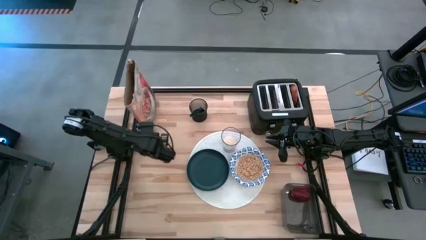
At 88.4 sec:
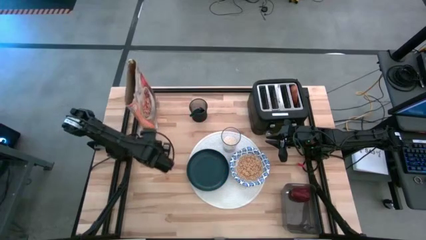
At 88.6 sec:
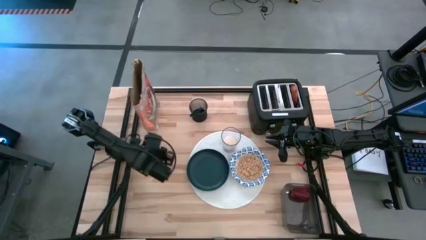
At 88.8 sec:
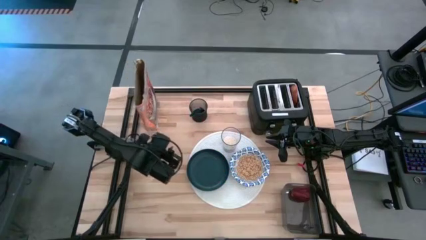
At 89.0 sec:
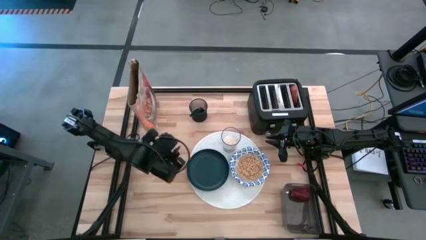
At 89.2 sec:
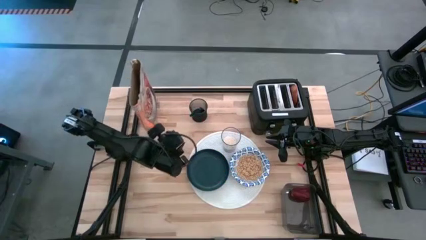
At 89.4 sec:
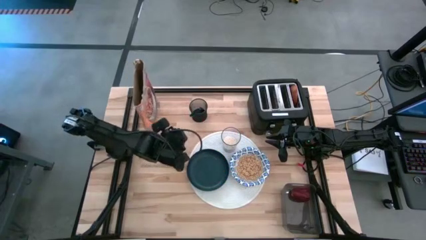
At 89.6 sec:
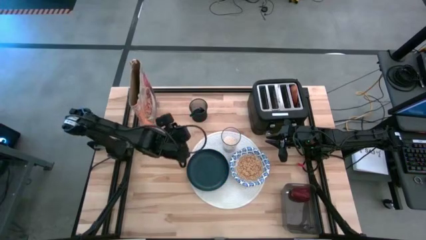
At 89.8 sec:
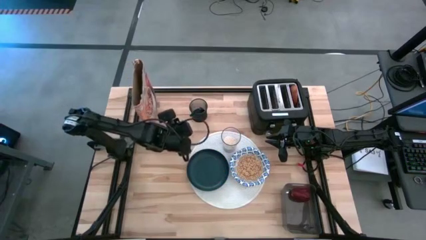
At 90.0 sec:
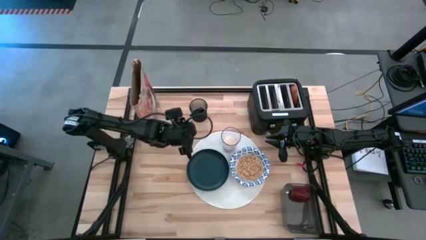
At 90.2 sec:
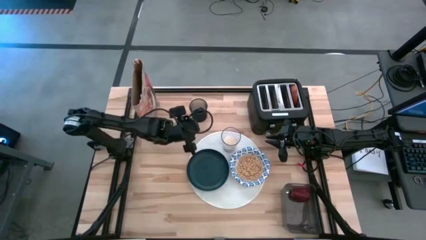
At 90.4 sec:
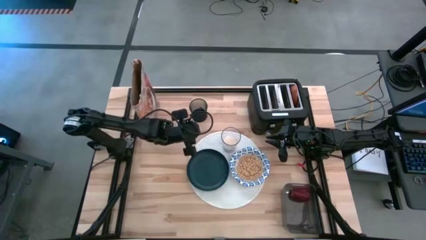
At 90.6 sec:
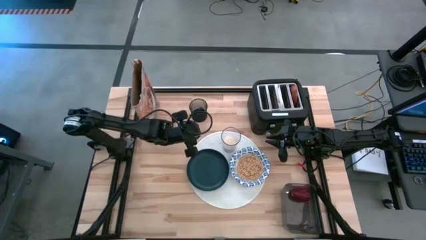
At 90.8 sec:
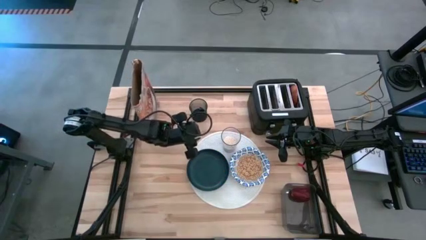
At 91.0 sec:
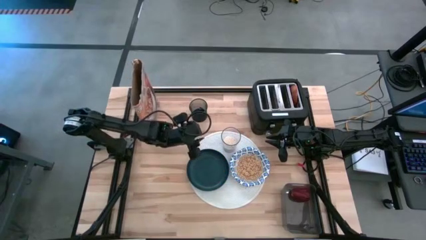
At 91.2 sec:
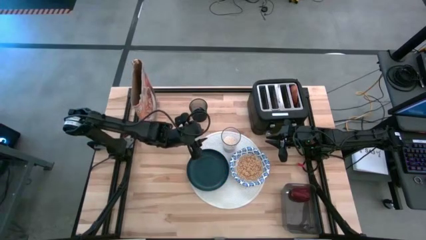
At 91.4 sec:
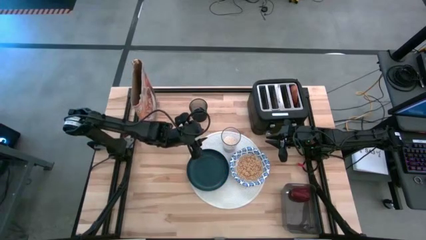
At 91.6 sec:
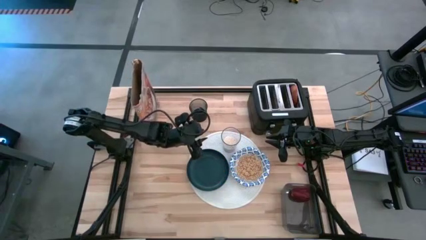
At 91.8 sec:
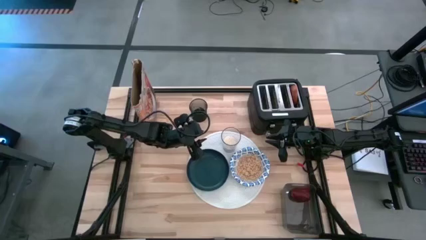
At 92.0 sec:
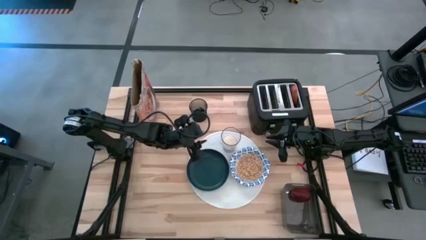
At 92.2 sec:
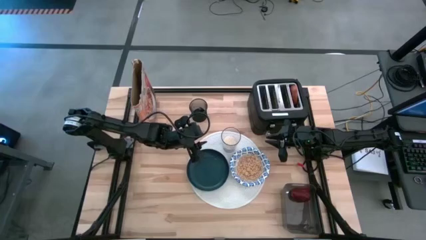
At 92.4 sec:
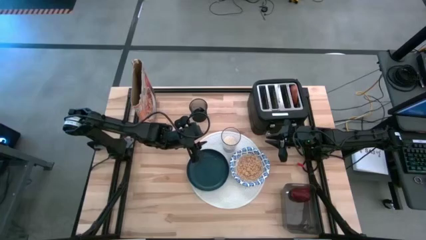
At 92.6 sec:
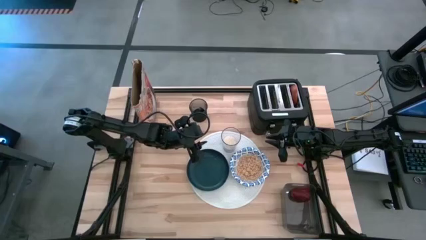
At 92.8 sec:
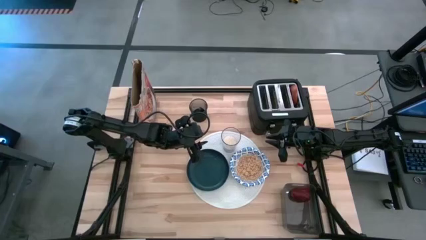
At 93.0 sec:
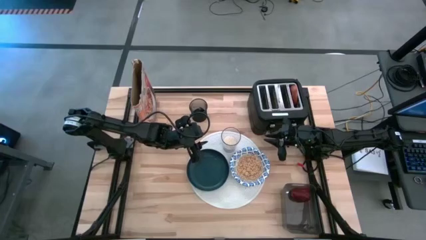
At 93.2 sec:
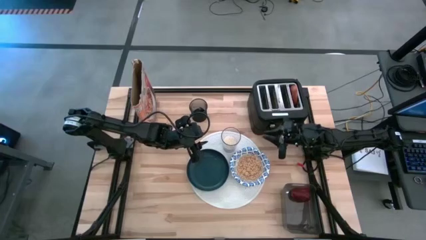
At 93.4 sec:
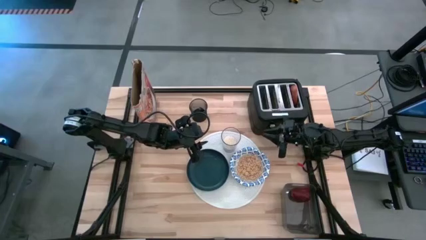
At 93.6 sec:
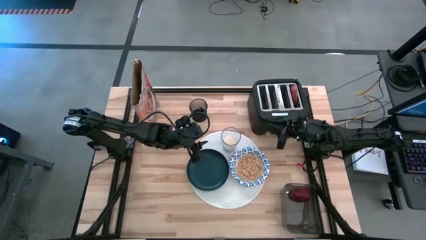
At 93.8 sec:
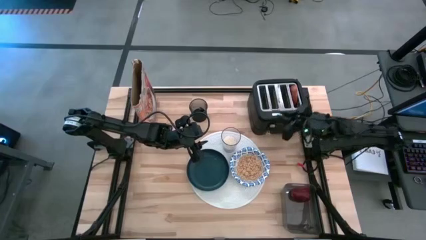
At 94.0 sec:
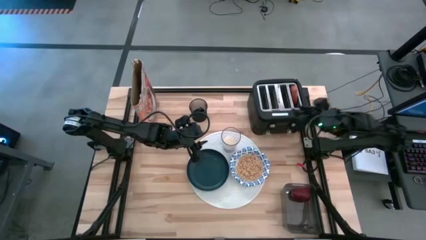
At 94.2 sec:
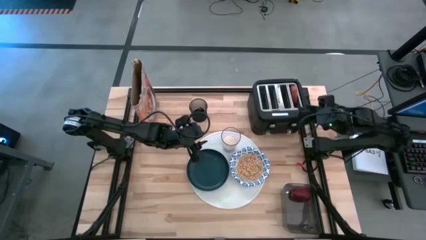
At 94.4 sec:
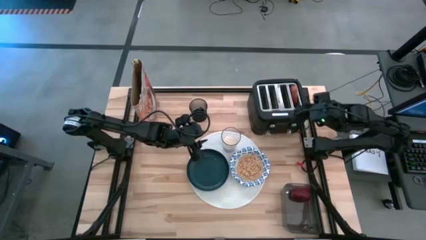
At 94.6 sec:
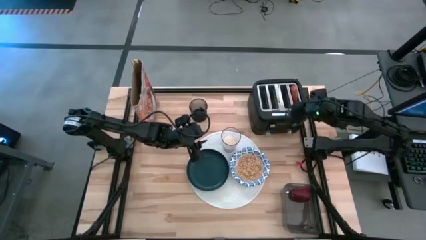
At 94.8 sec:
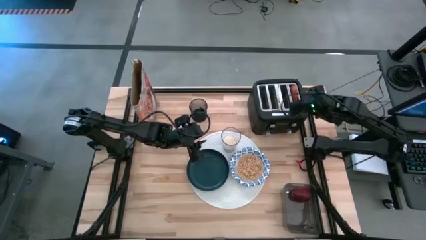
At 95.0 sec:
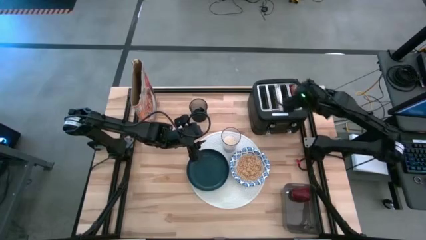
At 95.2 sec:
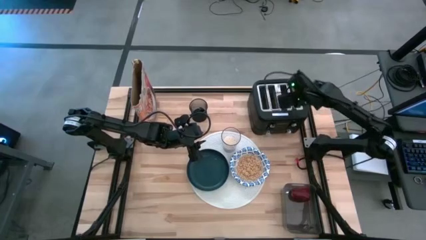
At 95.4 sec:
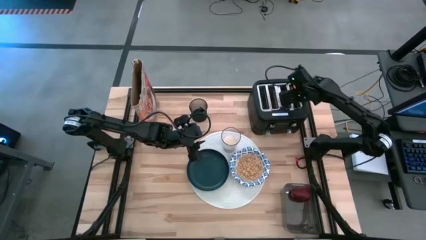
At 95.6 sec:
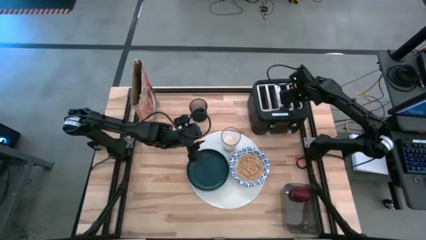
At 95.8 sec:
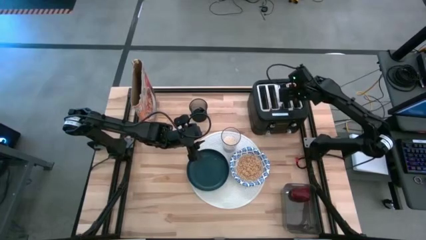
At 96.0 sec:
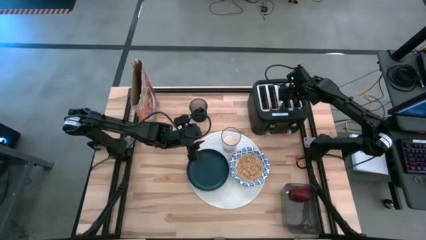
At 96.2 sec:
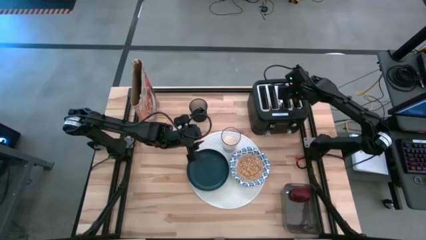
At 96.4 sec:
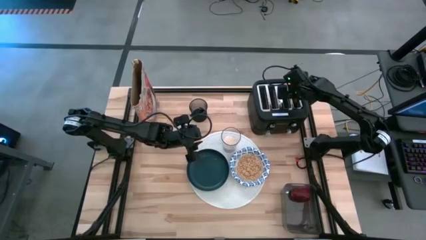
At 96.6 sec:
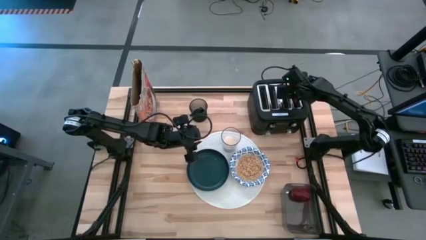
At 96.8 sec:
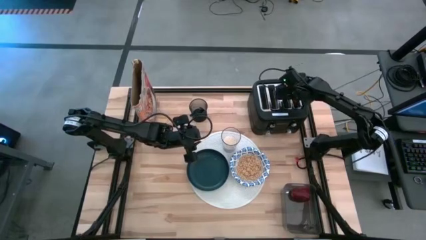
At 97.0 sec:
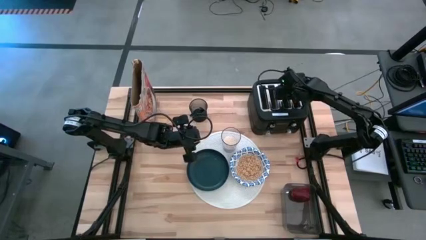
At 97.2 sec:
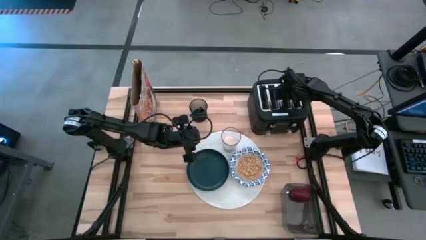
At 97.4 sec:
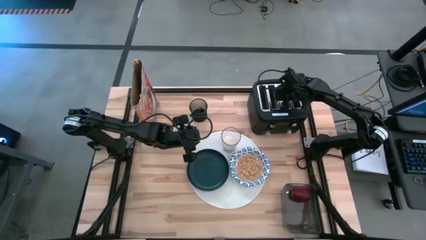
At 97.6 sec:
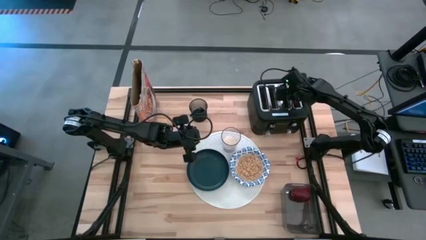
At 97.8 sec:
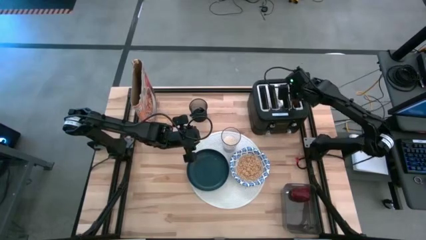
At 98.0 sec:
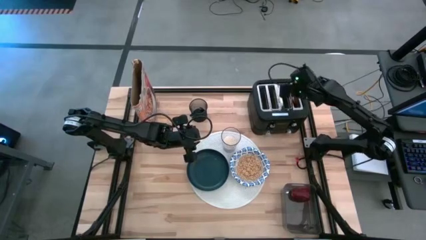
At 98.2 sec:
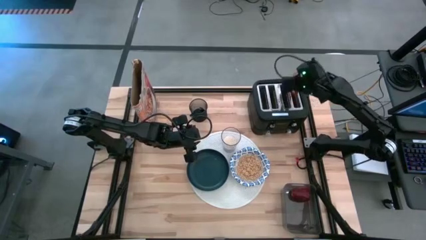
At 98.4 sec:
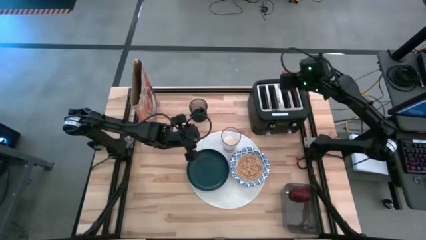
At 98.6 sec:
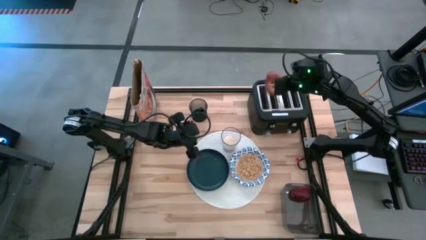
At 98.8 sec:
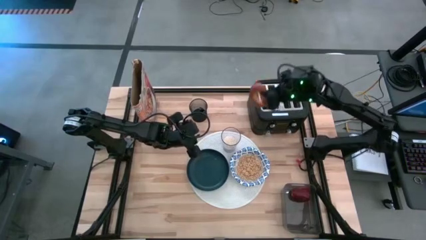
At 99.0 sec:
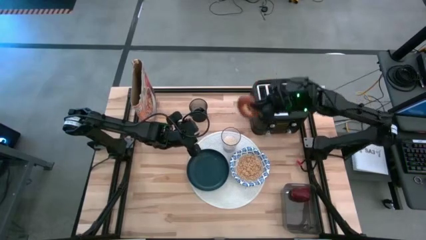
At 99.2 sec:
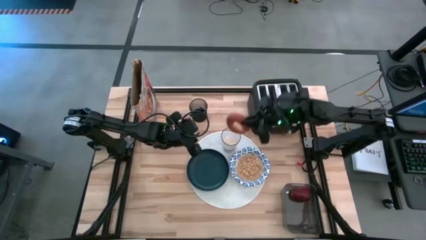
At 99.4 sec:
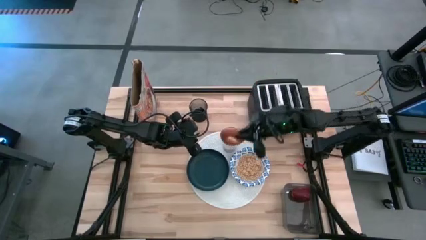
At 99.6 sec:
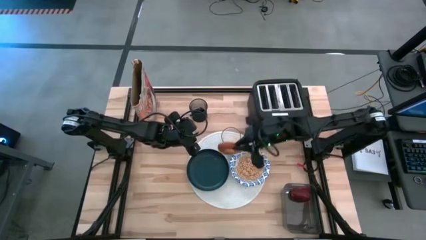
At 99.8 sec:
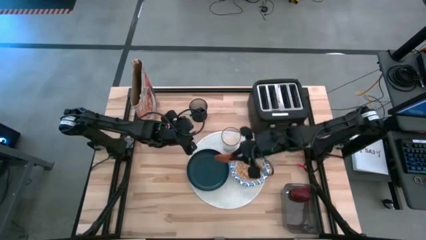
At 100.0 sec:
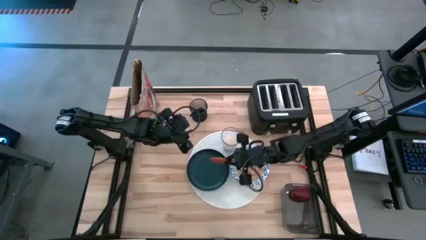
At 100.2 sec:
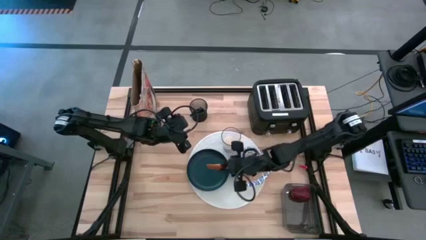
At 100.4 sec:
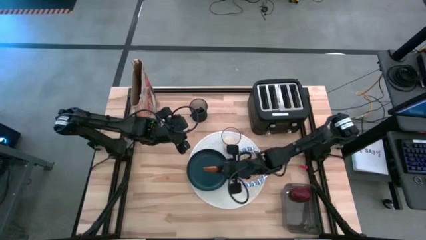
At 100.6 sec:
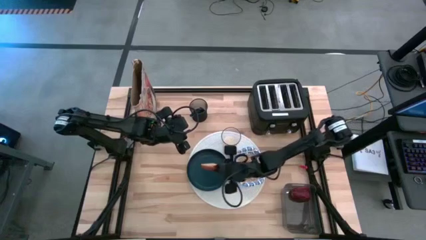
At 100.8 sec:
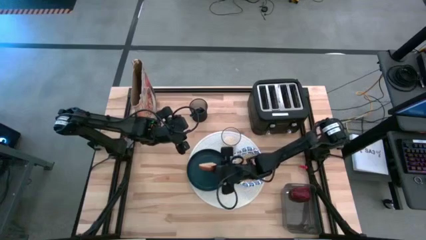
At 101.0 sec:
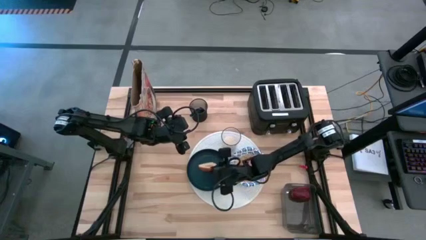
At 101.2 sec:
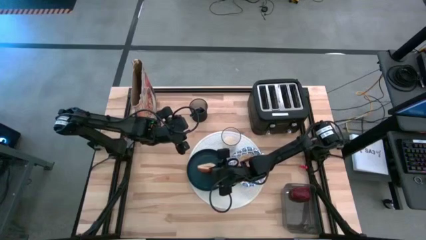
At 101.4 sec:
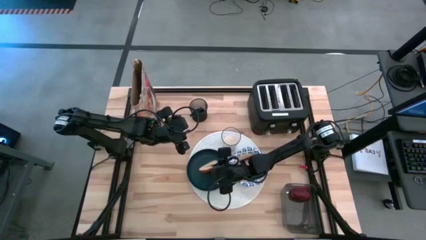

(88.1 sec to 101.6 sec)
Task: Arrange a breakfast setting
Put the bagel from the toaster on the dark blue plate on the white placemat

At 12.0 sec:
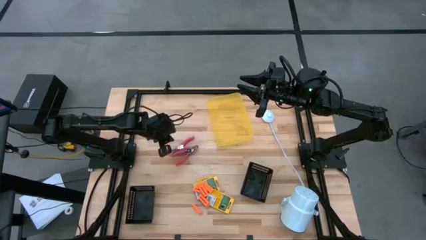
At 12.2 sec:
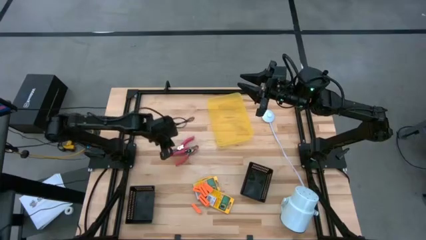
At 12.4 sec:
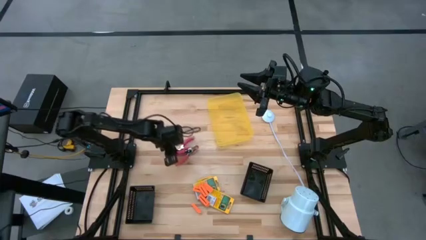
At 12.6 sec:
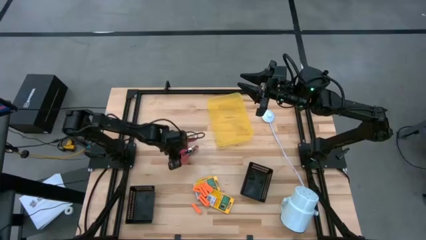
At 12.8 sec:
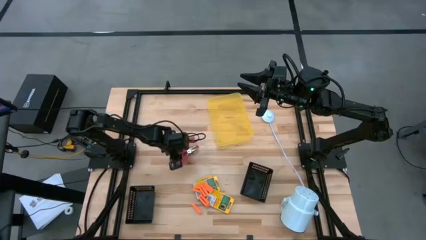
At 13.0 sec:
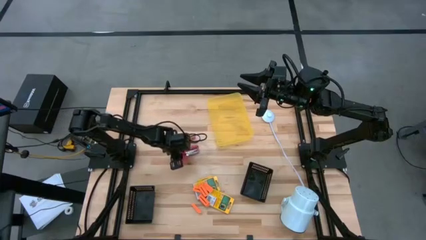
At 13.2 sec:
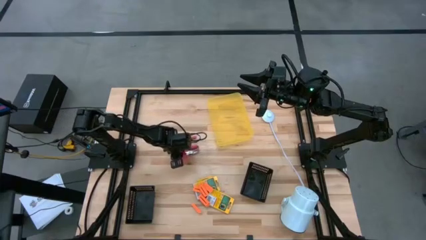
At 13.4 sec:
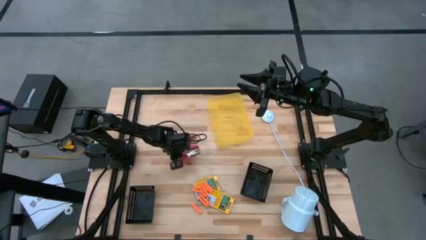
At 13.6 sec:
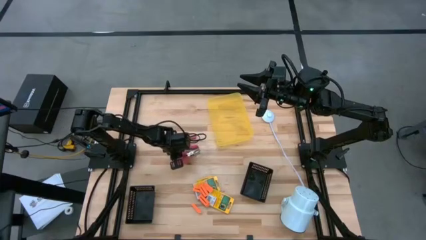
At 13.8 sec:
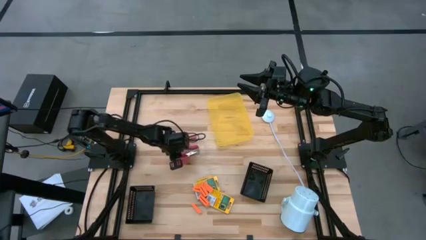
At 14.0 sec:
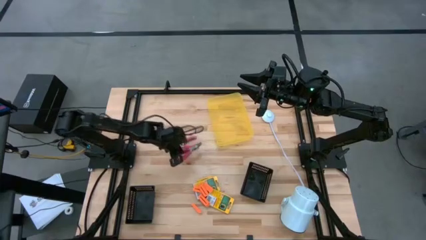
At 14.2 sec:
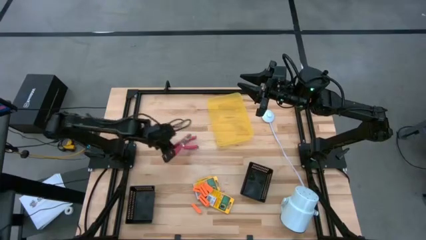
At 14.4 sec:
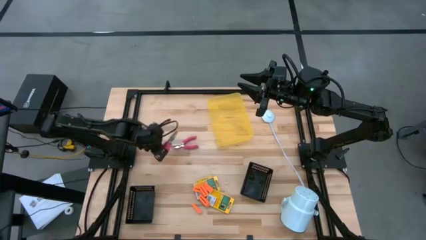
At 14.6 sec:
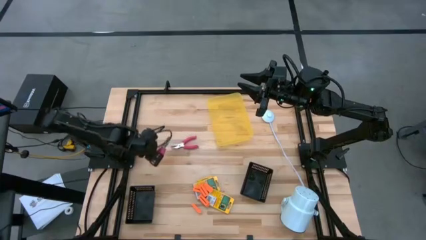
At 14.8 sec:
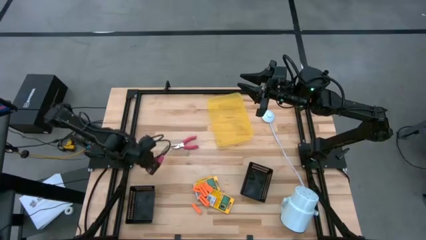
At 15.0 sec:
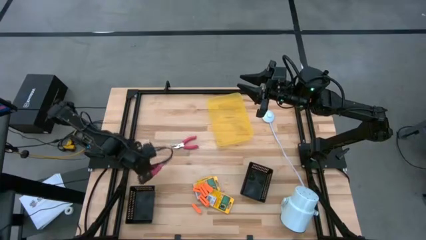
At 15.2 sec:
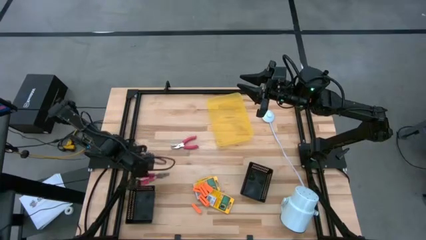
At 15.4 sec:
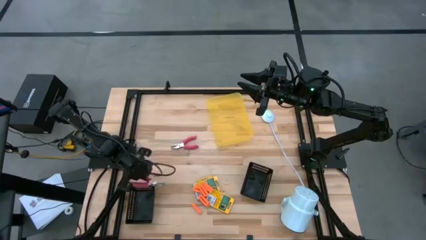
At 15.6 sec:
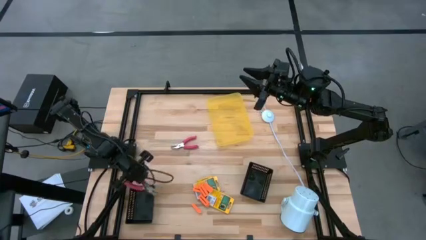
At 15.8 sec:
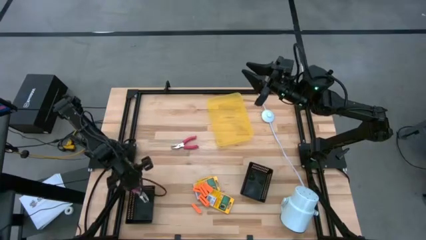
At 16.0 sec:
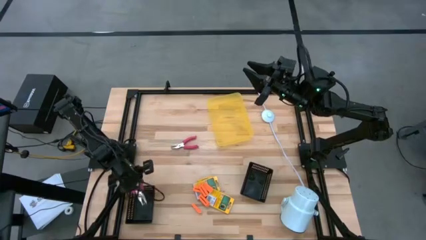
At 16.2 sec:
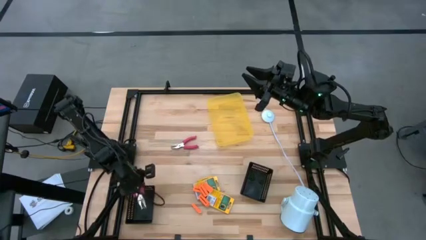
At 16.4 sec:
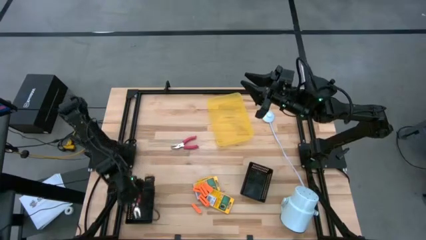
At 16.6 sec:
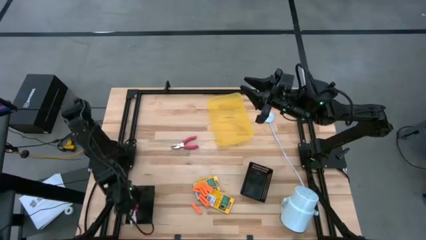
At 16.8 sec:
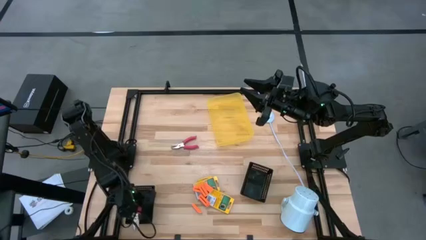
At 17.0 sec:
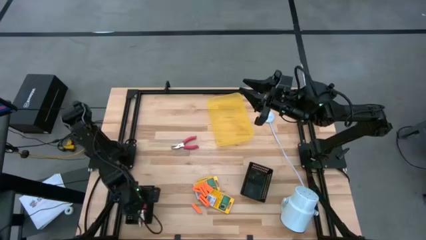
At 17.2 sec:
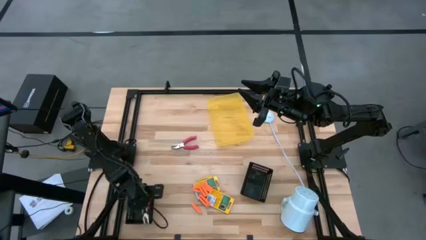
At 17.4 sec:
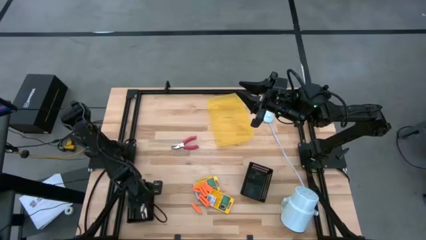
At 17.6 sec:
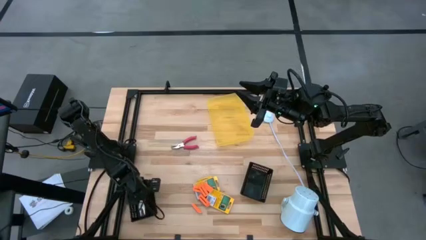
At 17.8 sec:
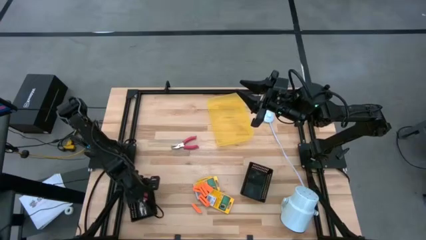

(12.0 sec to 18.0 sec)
Task: Pick & Place School Supplies
Put the pink puncher into the left black bin
